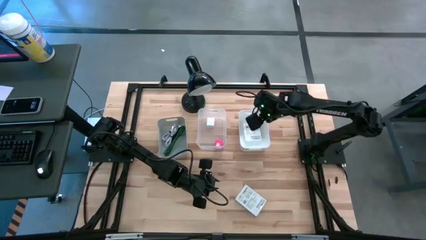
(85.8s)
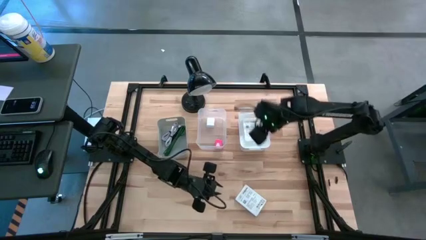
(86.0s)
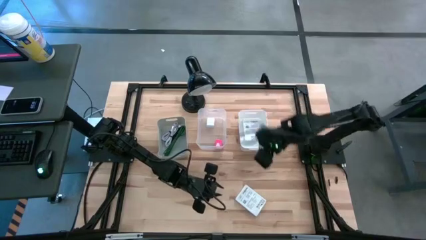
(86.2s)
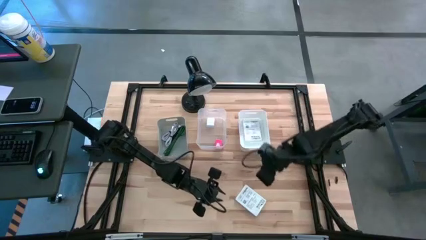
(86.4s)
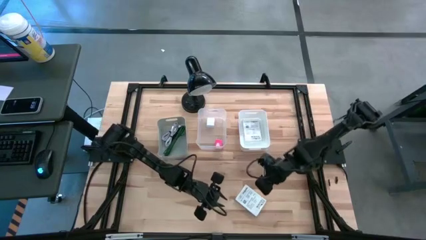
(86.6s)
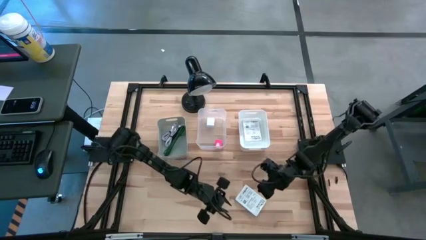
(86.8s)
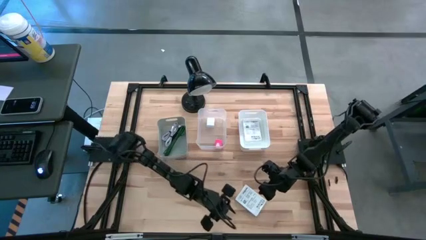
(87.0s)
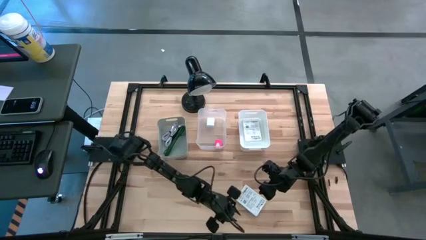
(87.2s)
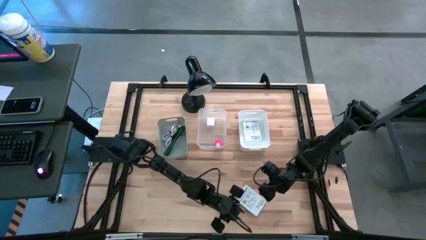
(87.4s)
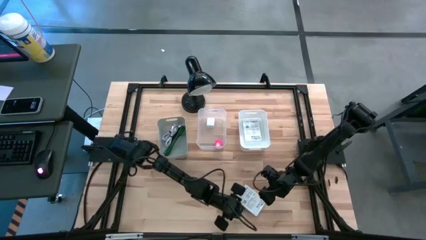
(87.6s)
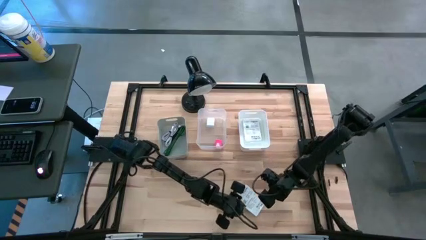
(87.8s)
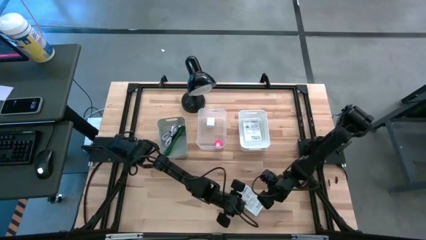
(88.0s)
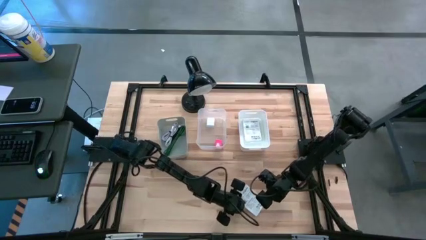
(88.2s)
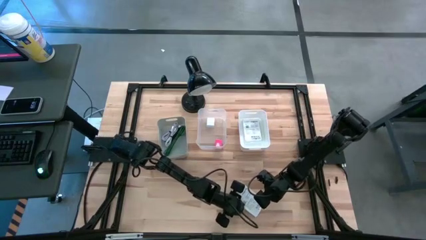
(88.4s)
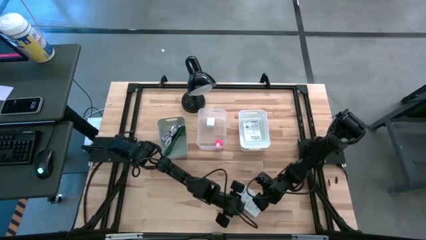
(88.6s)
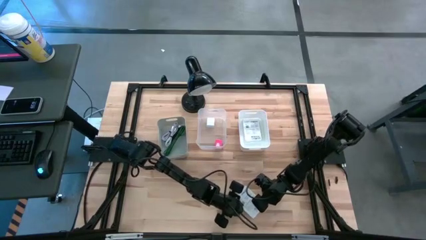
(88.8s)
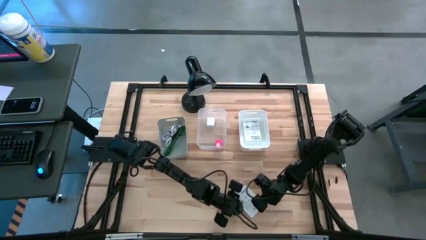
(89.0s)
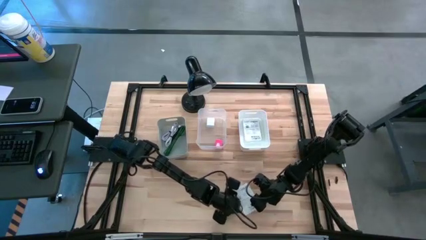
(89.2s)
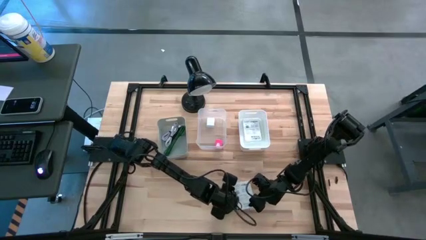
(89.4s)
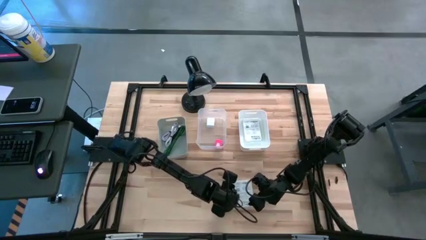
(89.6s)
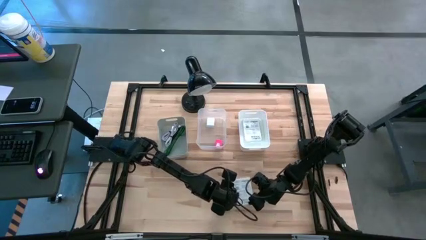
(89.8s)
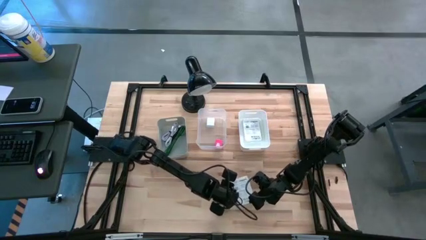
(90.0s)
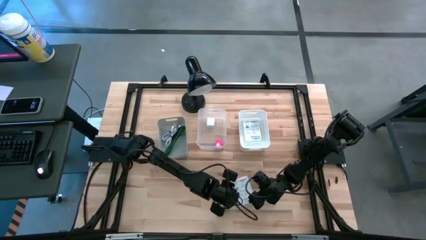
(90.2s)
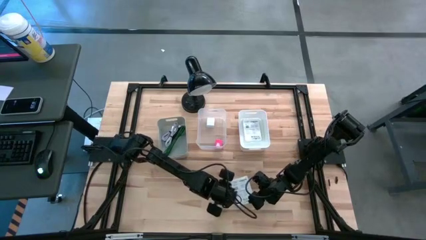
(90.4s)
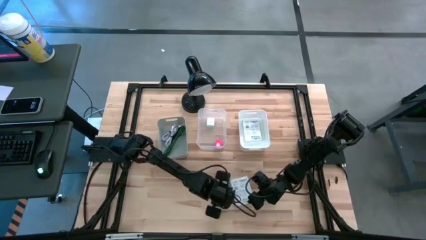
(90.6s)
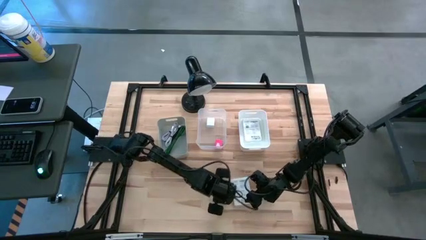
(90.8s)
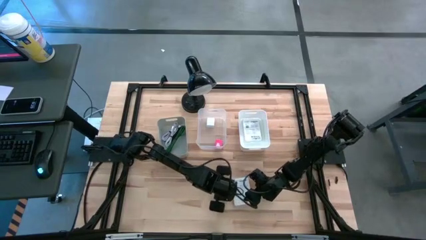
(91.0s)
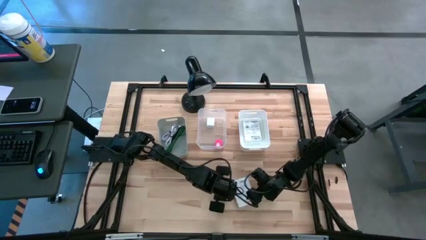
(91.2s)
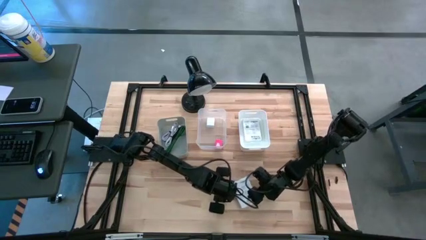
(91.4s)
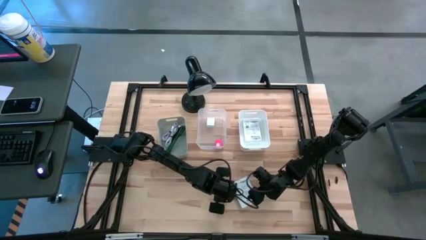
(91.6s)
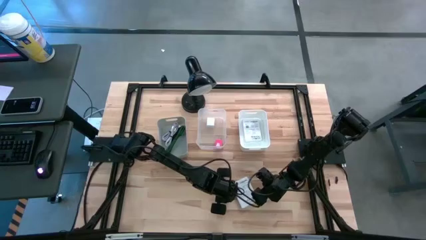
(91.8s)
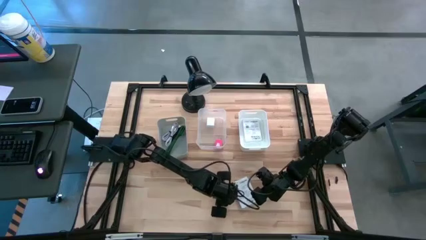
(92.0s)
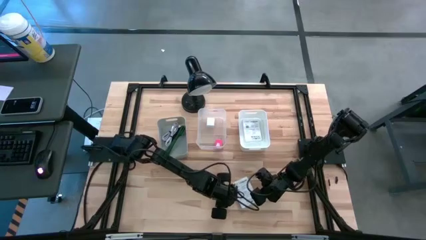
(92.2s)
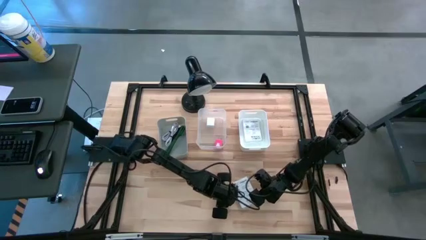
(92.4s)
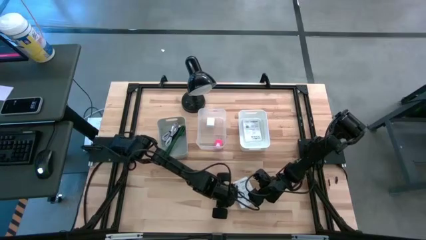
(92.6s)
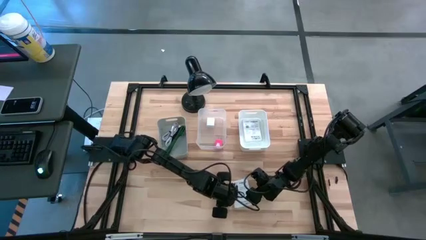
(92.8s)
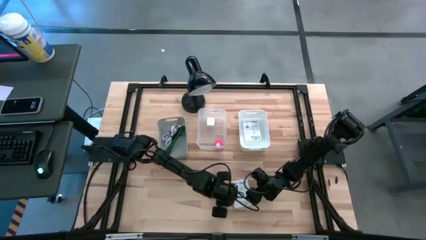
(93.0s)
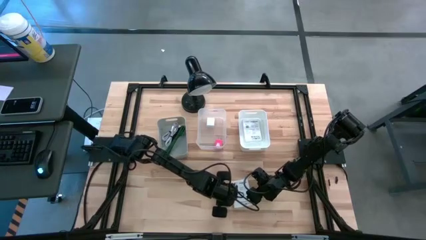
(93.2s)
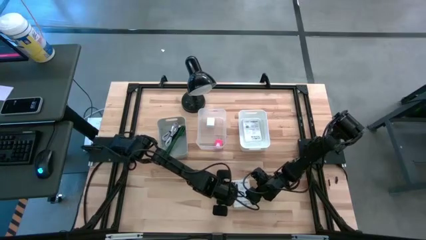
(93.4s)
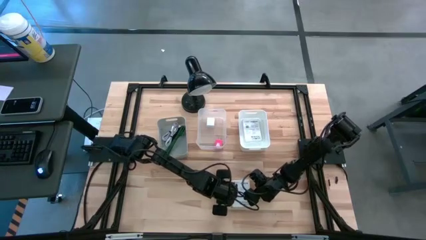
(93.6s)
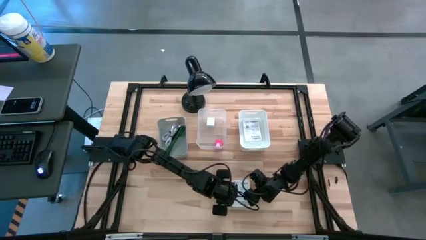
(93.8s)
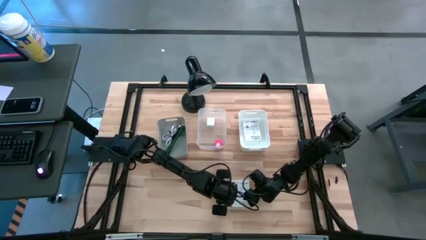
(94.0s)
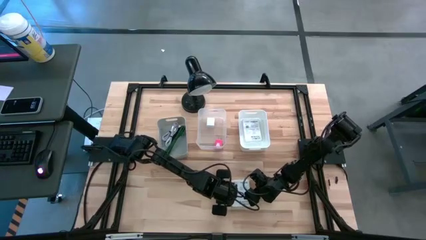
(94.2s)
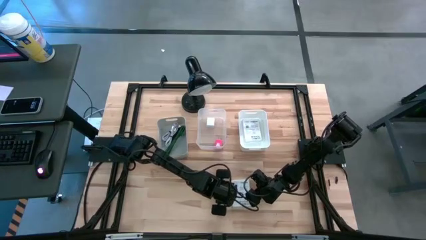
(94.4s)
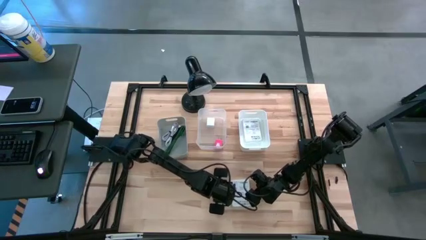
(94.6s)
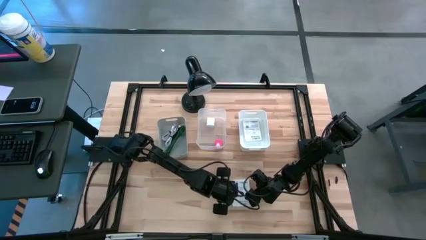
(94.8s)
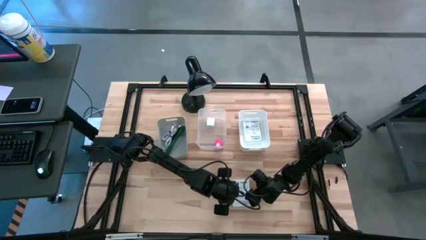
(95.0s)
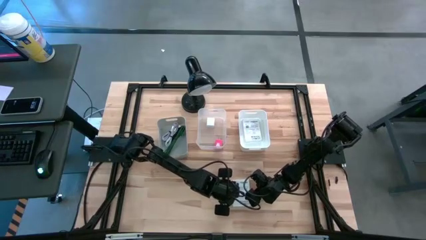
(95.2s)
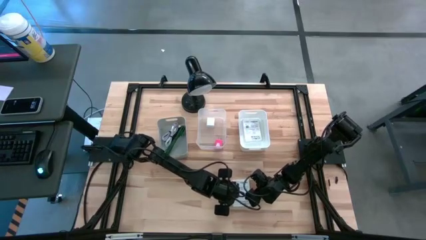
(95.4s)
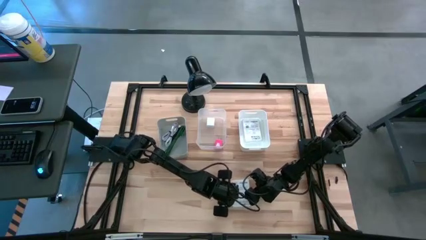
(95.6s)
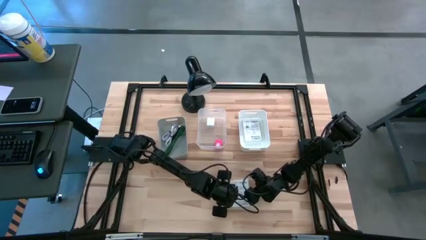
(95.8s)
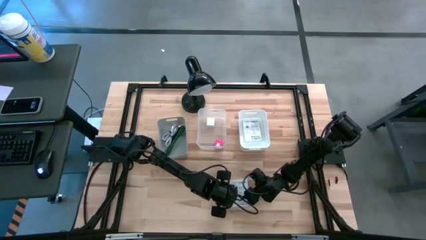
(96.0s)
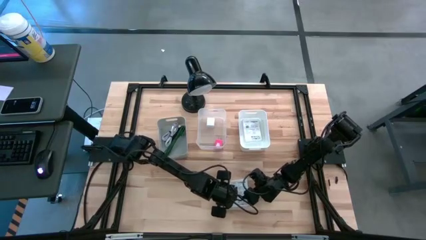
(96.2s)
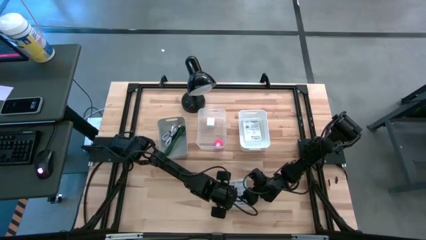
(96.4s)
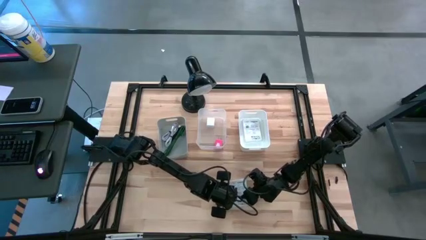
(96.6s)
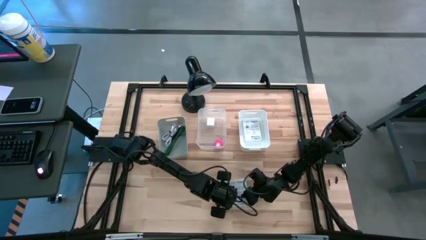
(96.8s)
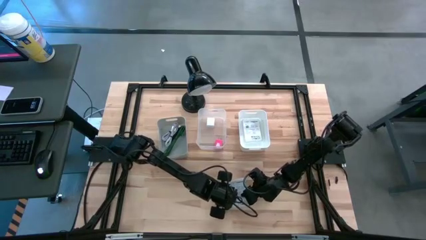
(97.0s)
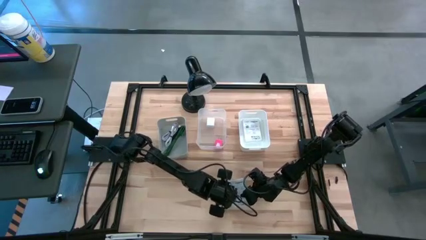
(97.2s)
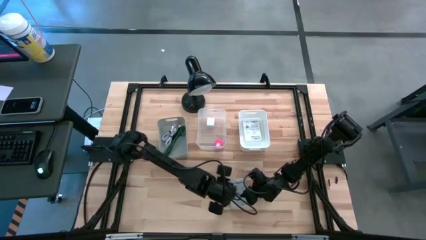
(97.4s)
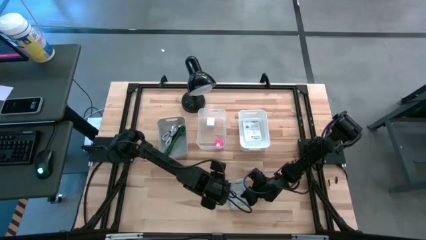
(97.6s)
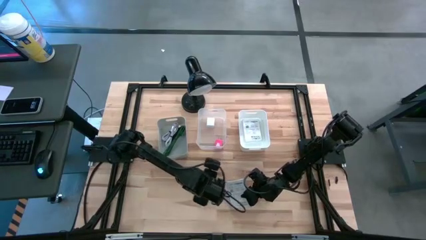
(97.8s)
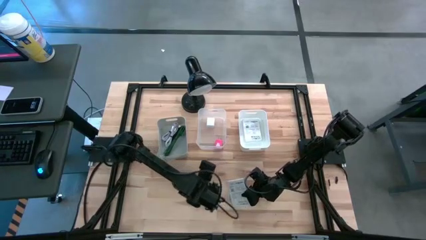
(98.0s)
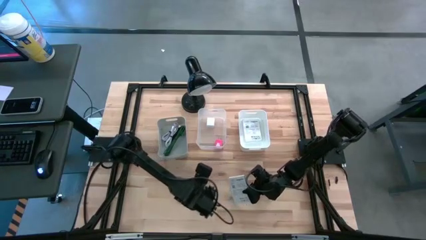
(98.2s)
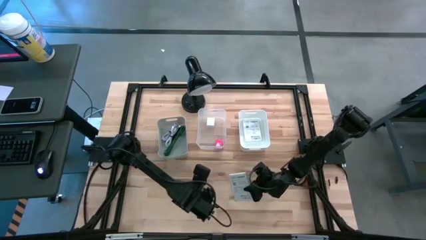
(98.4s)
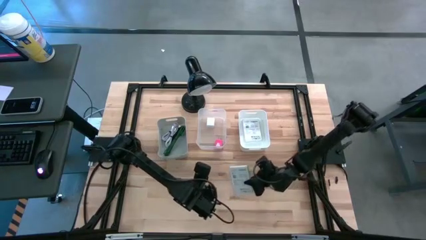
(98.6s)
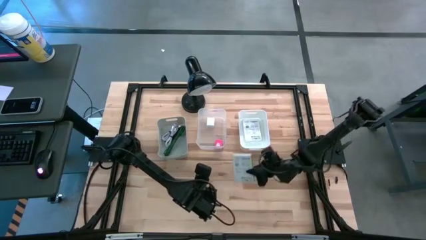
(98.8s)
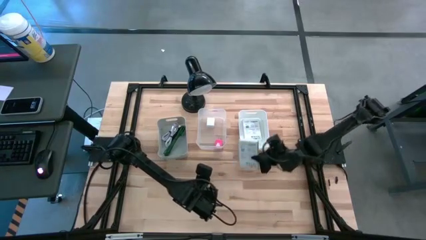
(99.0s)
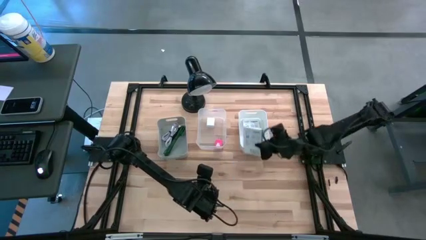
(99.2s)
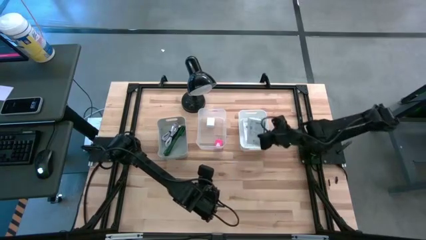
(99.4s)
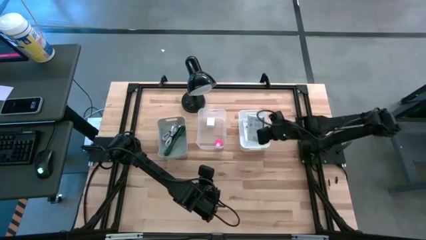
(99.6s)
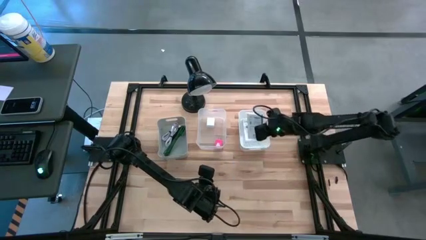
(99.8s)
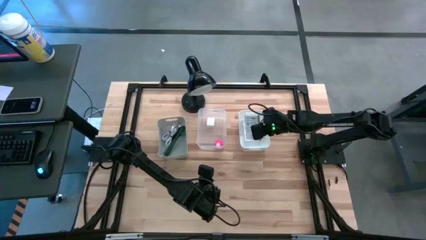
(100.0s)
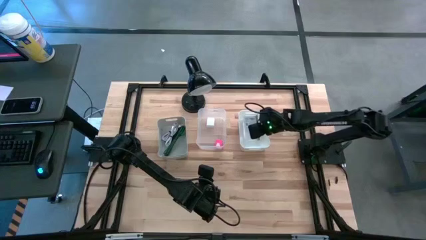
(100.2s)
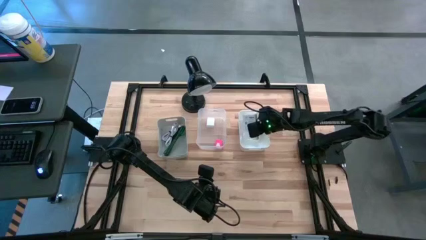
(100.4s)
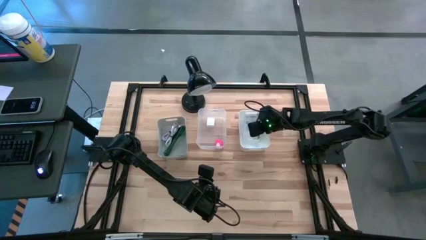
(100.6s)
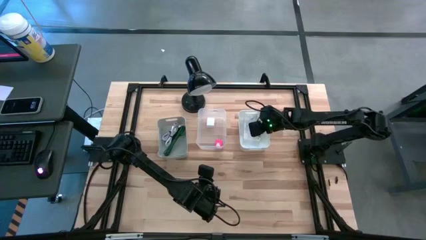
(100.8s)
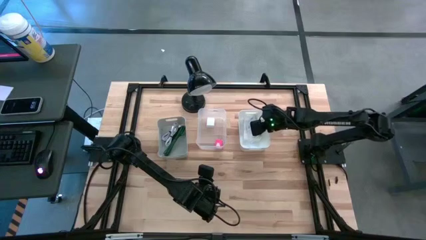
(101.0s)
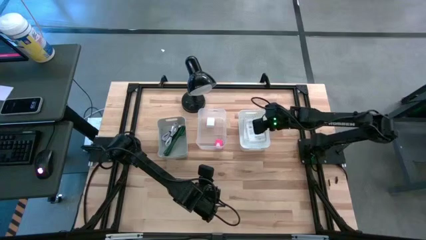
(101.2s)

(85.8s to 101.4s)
Task: Pick and place items into bin
Put the white box into the white bin

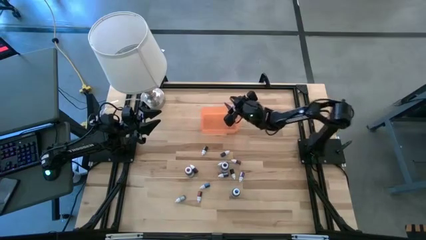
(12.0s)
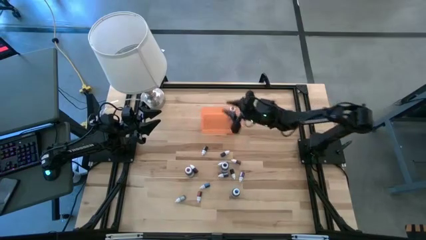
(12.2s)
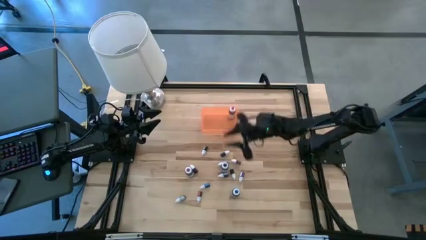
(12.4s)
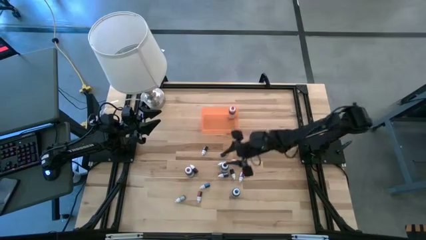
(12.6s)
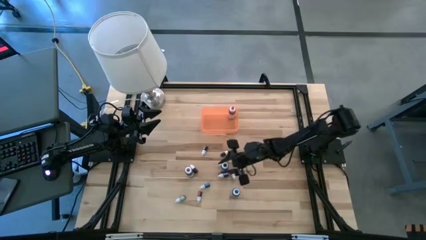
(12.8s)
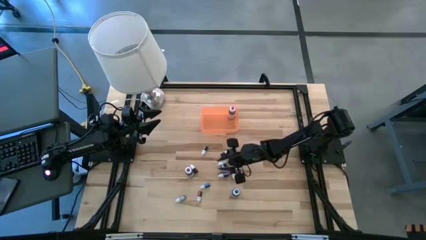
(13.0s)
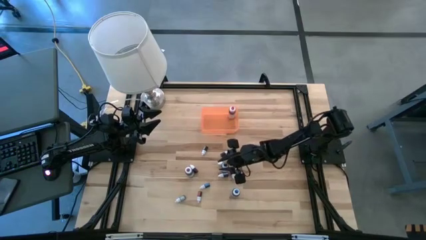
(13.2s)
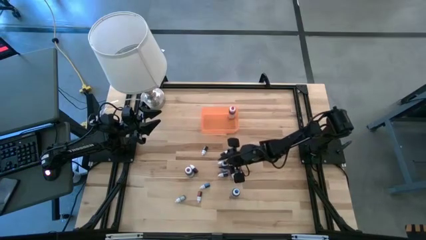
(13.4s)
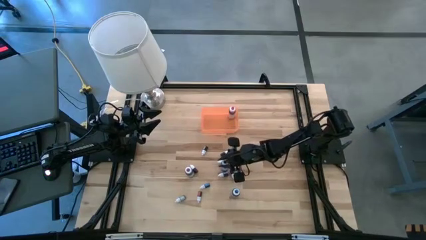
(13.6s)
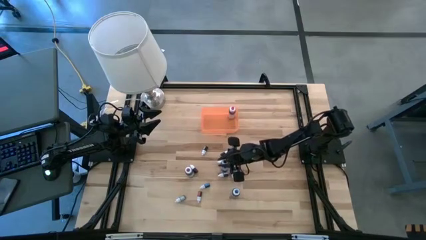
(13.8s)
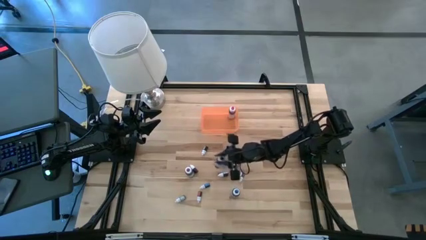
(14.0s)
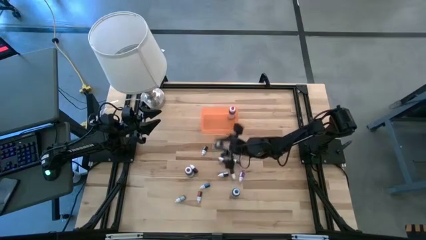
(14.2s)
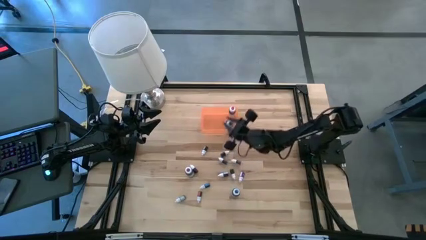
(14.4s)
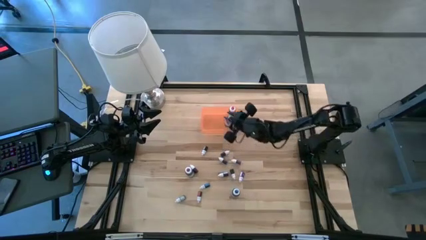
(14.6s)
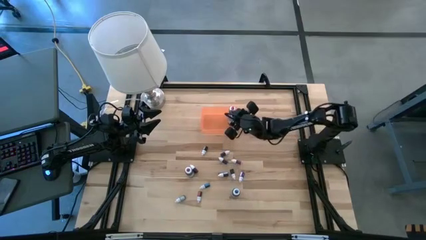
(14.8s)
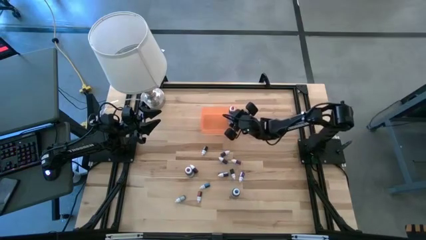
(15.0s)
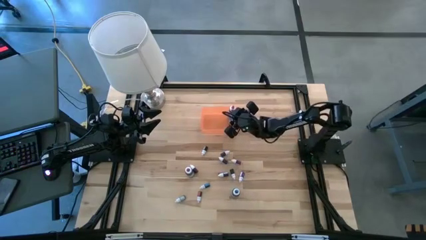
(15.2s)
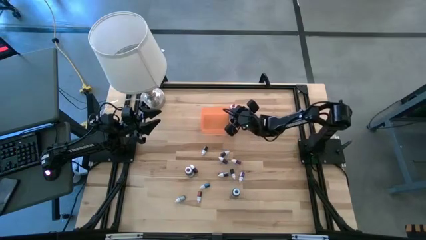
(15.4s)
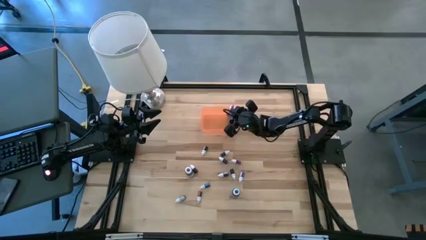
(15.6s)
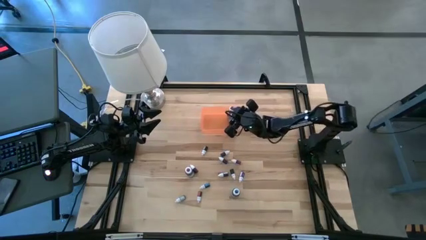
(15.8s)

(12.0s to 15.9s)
Task: Pick & Place food coloring
Put the large black food coloring bottle into the bin
